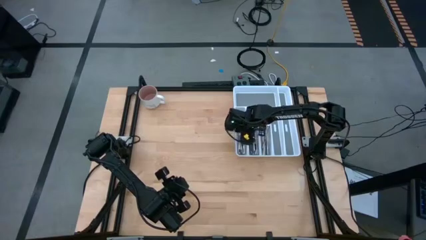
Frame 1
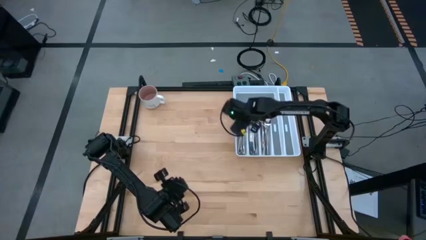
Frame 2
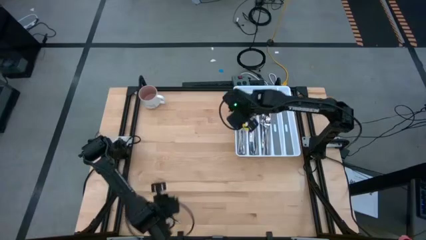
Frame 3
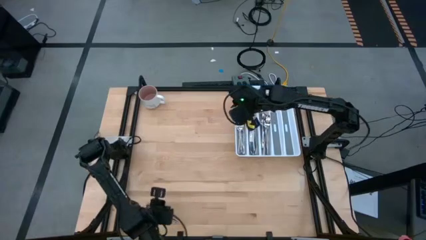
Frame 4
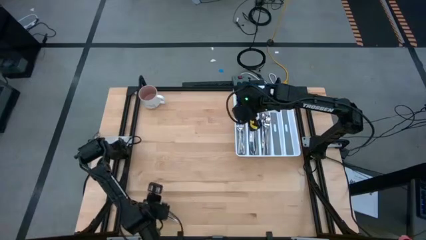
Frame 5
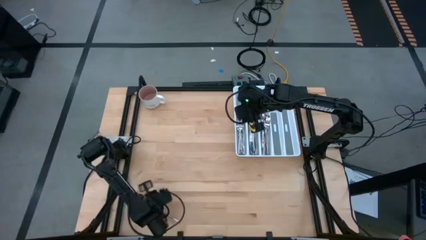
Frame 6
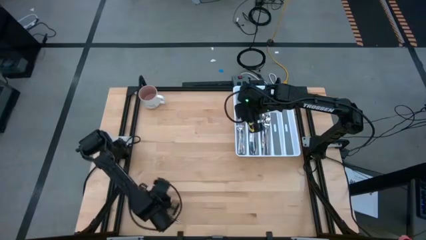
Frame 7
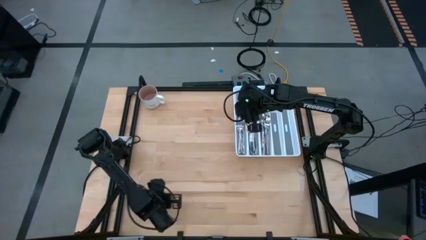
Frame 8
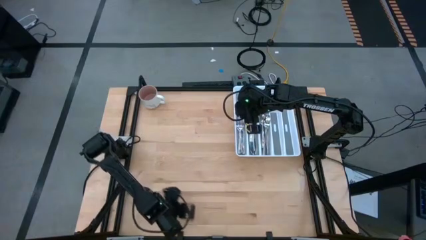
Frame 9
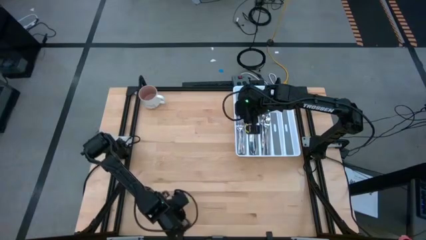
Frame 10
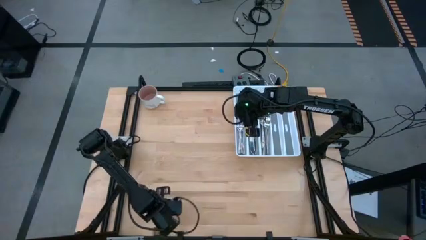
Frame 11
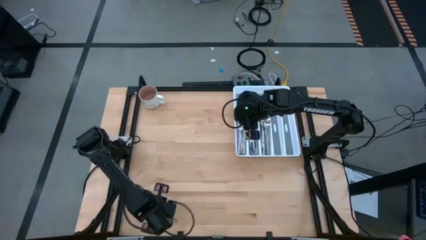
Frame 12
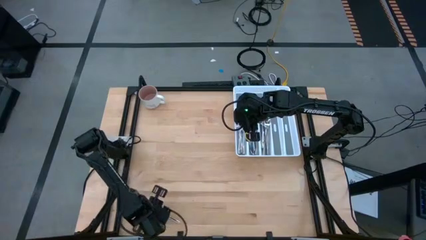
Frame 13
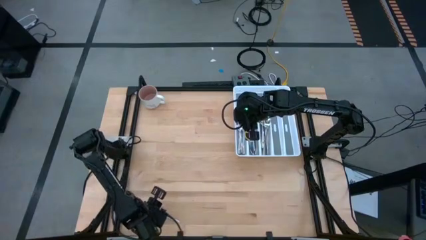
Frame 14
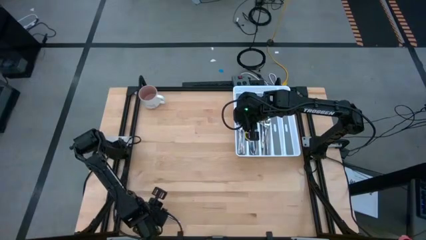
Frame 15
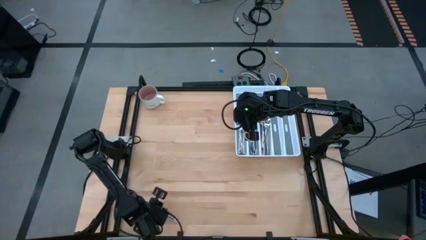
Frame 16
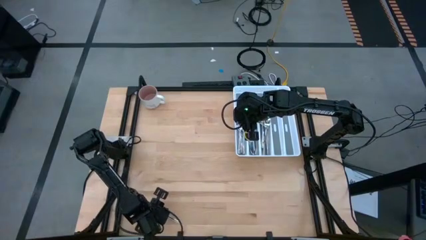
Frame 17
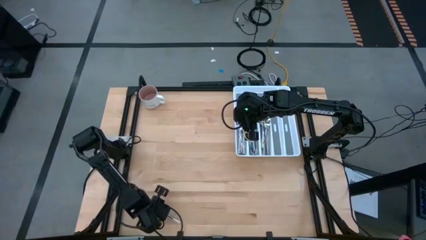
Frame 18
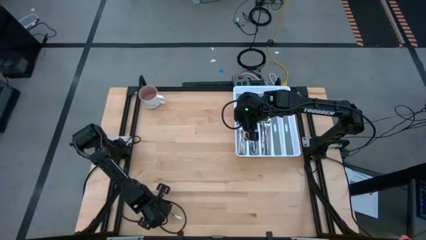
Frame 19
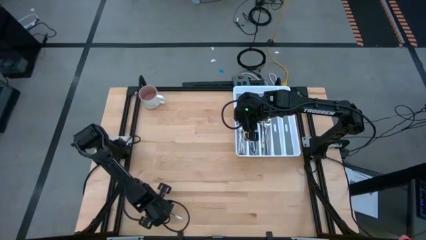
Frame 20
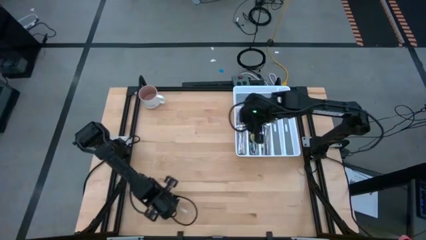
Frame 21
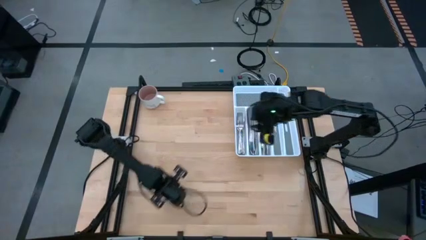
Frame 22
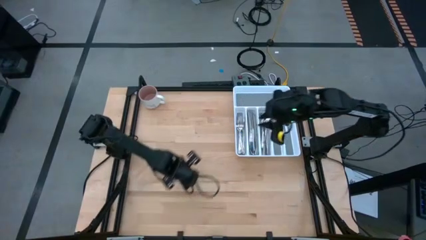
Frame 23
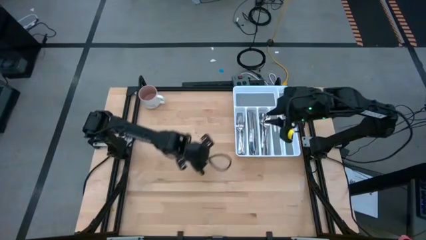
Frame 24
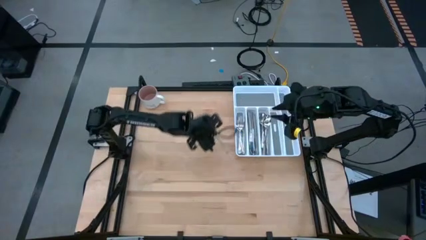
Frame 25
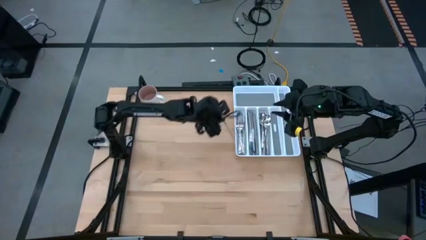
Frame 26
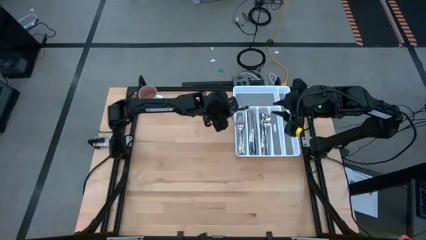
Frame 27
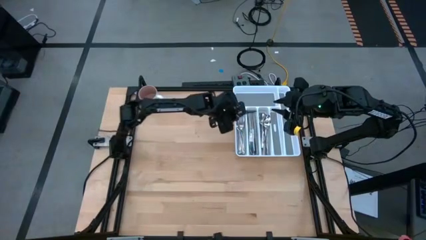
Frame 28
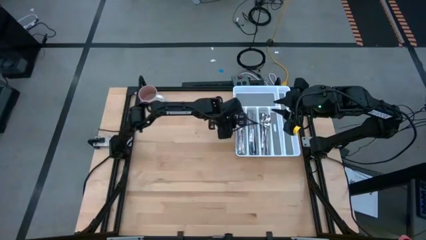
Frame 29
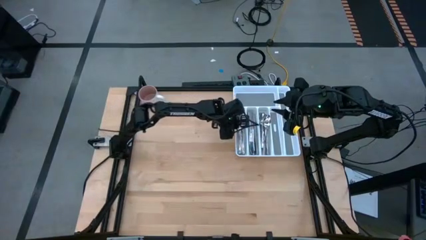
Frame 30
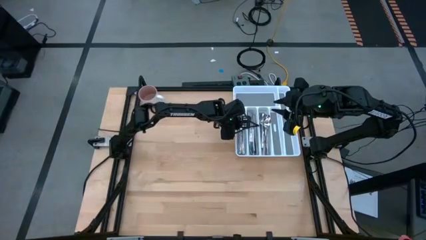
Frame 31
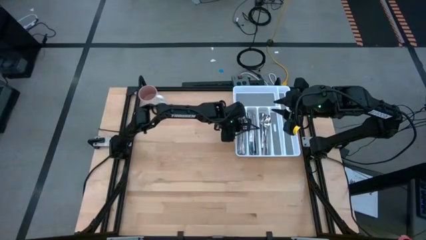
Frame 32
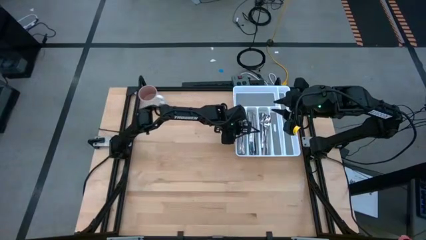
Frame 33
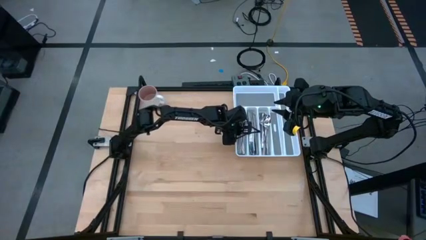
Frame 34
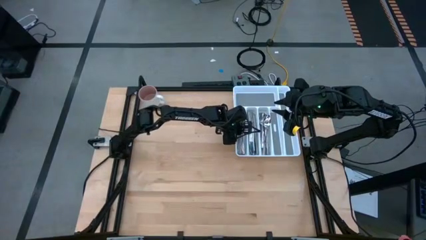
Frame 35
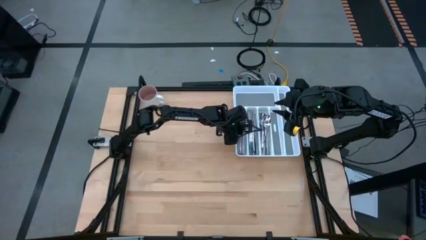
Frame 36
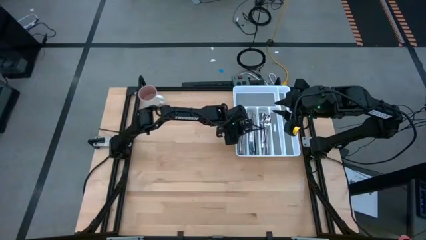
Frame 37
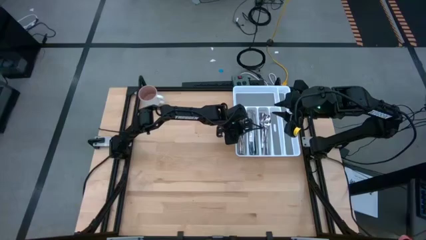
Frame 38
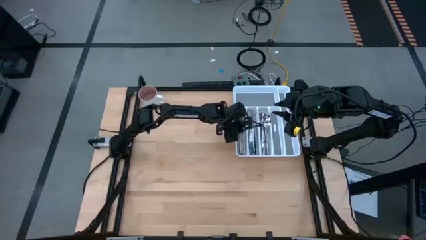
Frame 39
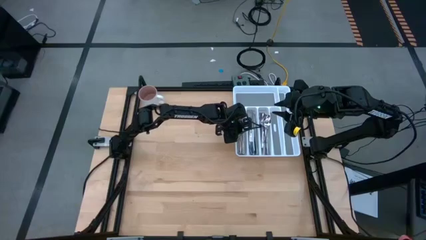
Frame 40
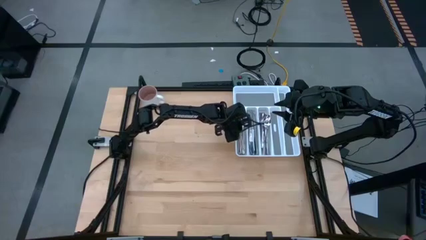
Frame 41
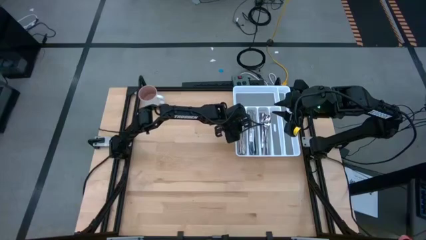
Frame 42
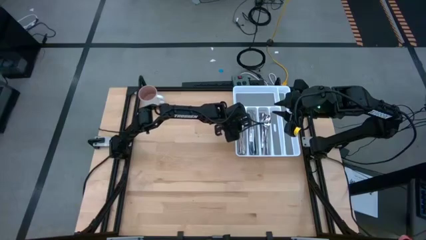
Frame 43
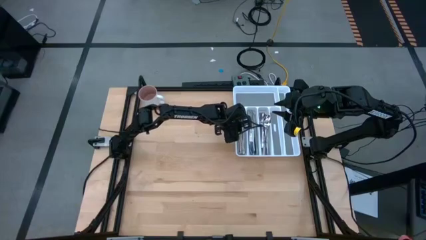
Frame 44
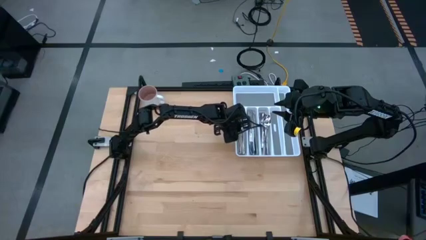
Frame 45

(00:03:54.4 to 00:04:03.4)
Task: Sort silverware
Put the silver fork into the left slot of the white silverware tray

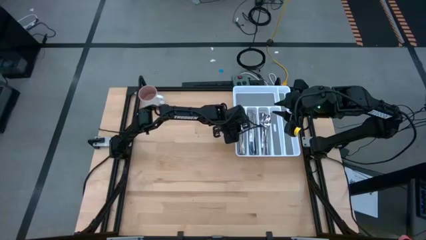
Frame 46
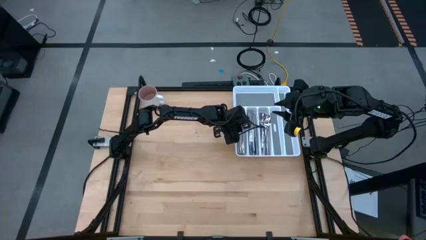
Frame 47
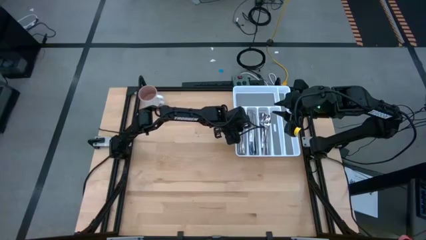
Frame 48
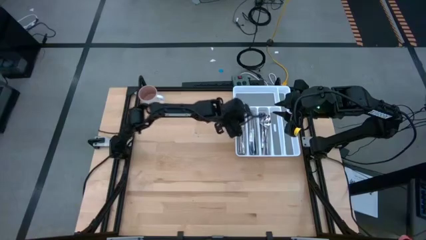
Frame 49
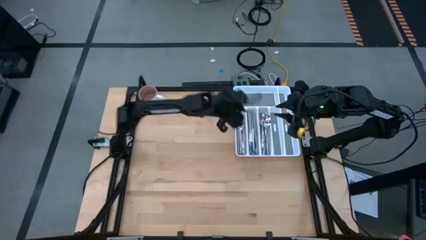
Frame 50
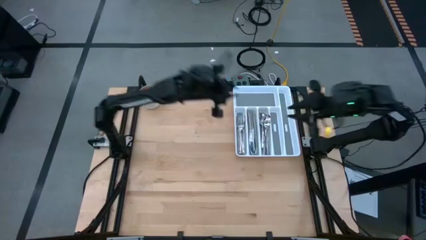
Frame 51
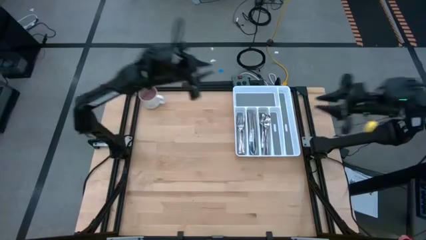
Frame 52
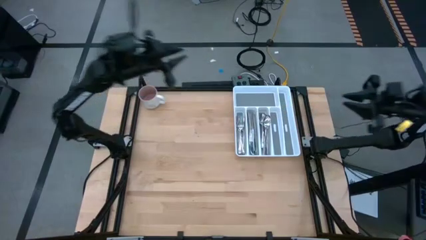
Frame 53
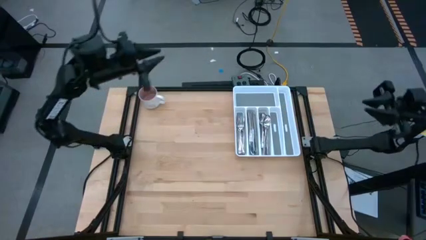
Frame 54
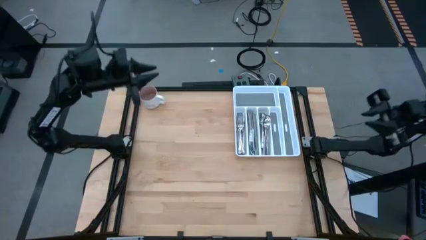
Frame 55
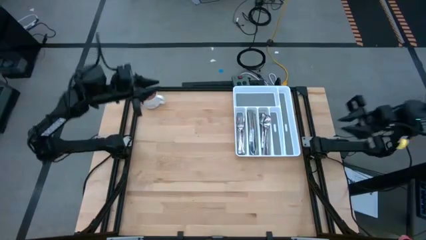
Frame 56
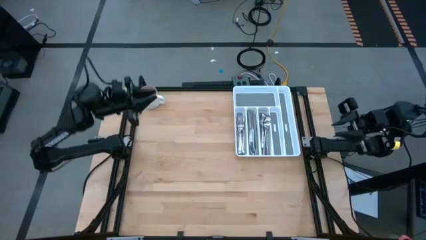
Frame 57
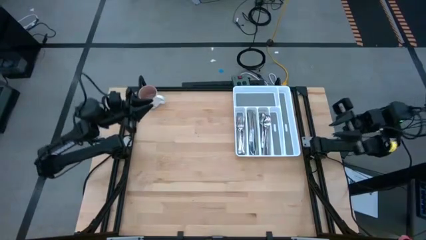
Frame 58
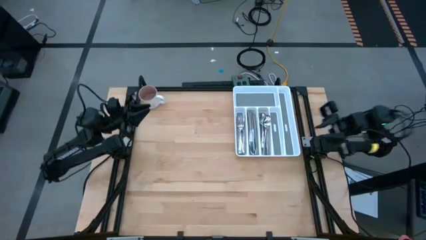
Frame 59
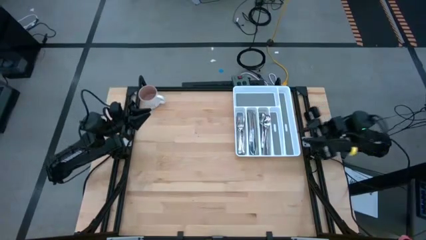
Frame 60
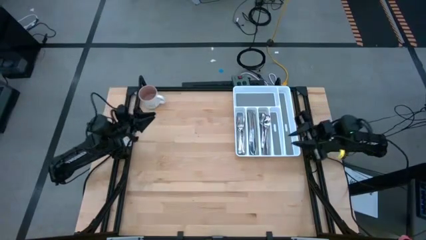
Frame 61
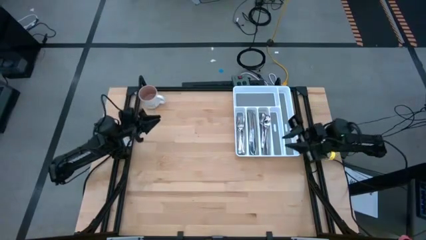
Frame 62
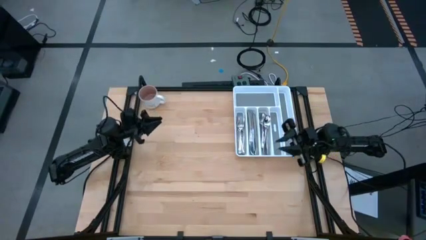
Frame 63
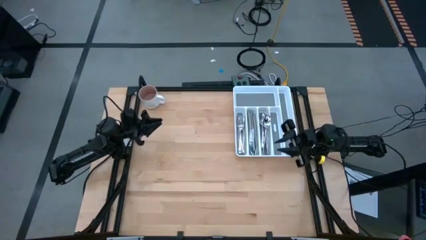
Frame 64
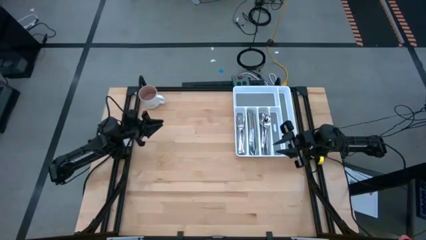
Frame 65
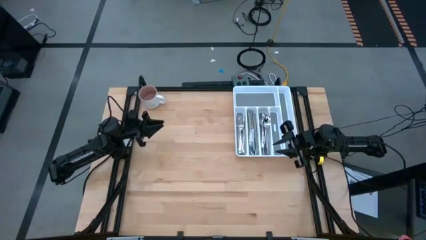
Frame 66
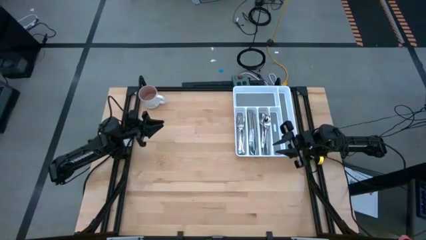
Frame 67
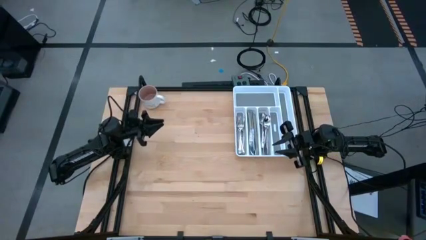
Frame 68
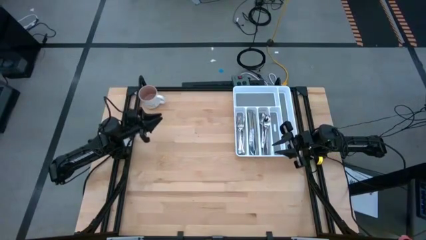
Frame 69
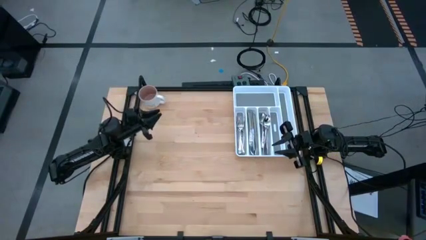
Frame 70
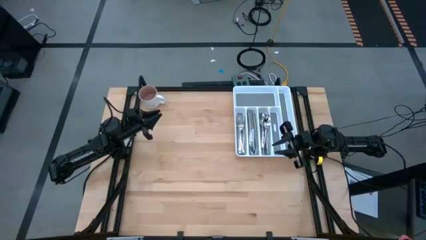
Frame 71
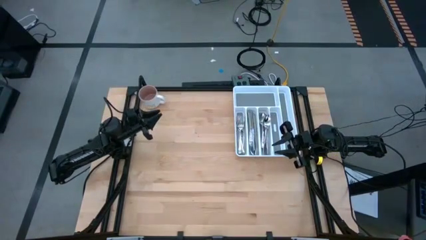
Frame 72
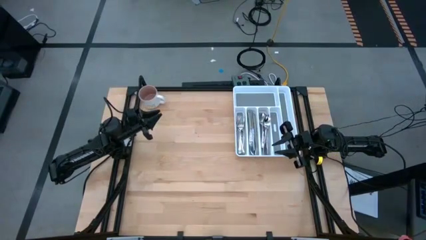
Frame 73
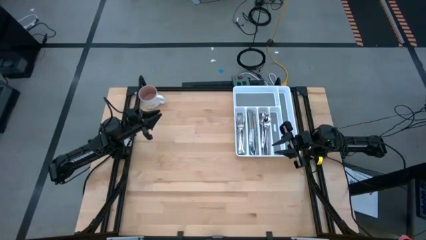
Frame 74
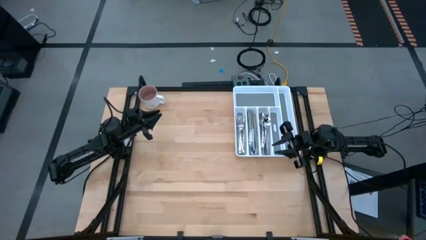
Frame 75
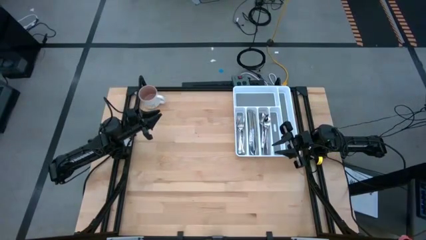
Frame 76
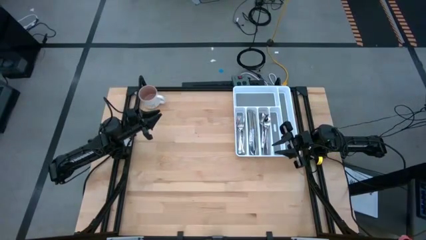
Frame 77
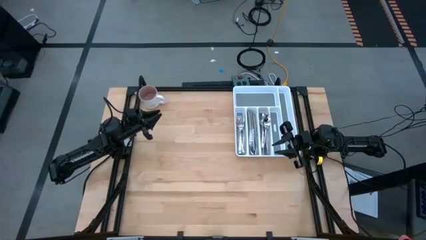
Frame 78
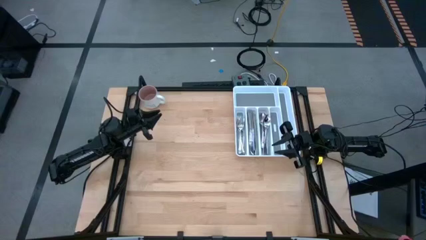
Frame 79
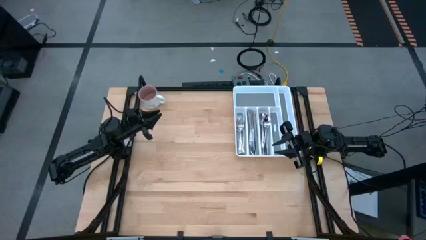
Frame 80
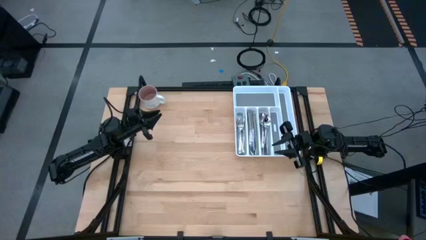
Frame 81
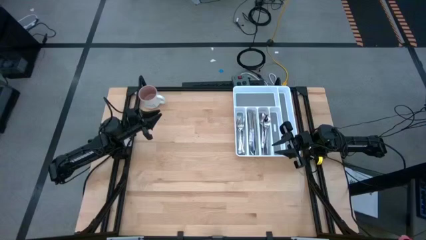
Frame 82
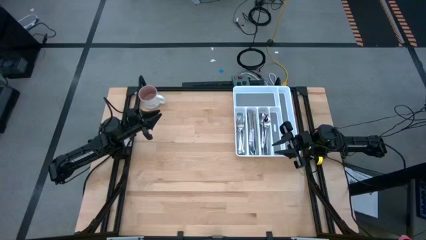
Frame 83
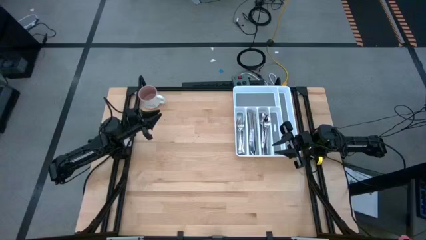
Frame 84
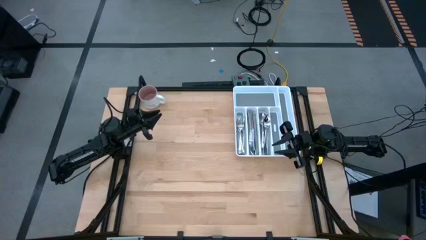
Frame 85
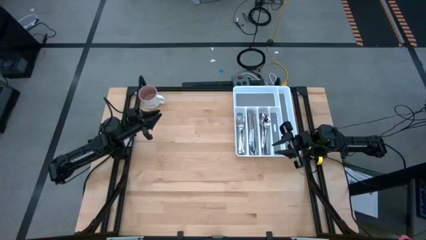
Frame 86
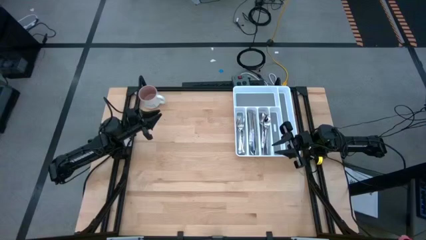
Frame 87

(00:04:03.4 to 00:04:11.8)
Return to Home Position
